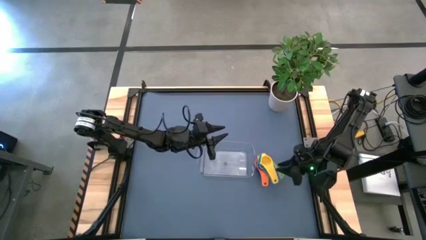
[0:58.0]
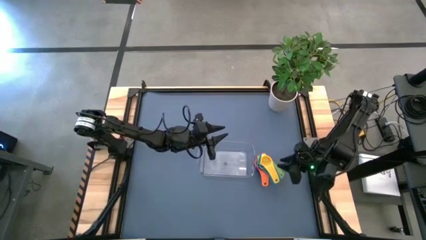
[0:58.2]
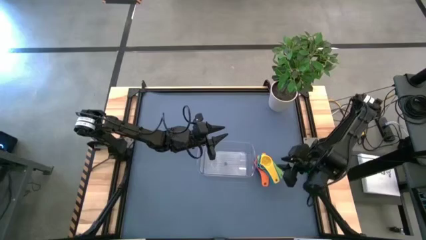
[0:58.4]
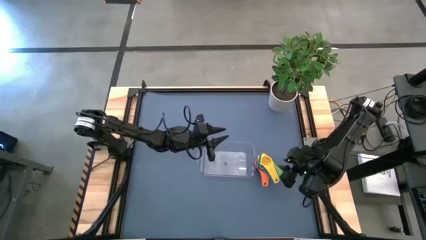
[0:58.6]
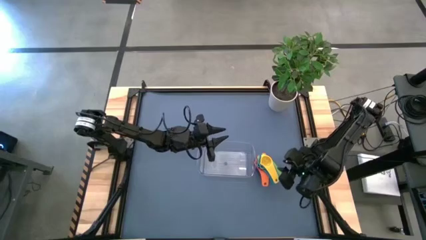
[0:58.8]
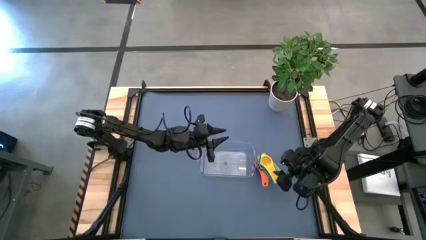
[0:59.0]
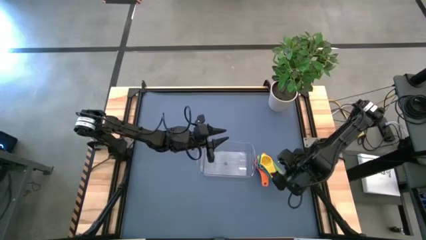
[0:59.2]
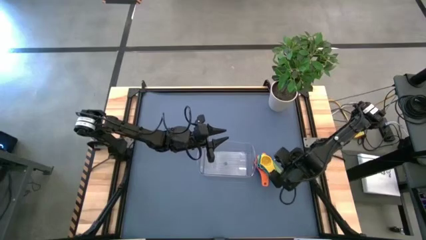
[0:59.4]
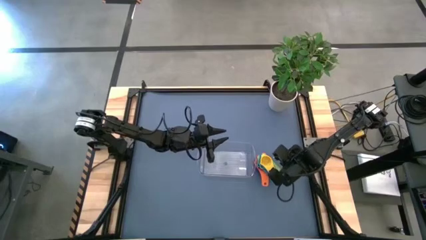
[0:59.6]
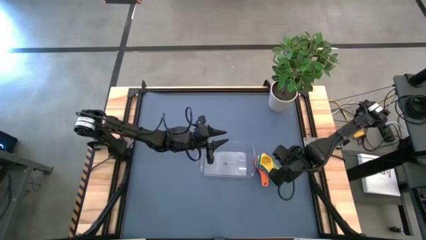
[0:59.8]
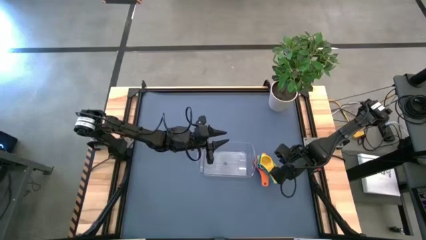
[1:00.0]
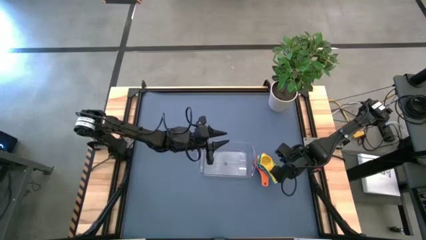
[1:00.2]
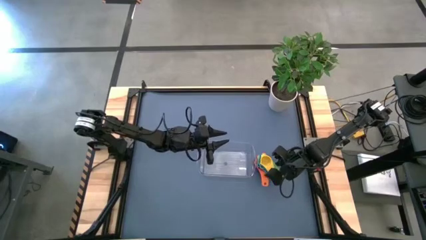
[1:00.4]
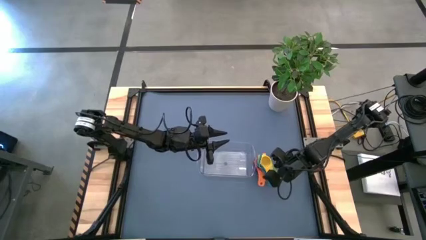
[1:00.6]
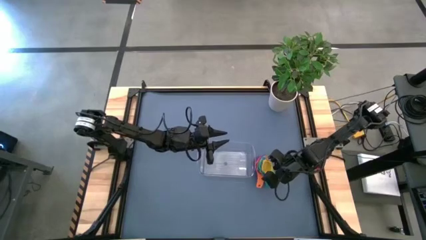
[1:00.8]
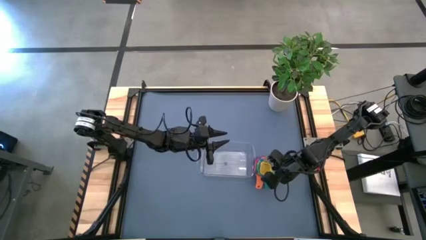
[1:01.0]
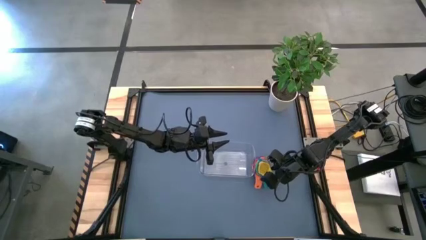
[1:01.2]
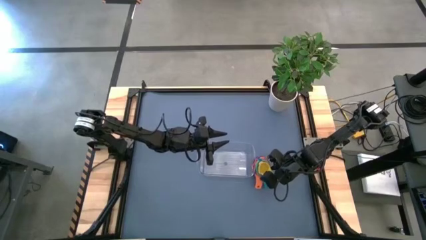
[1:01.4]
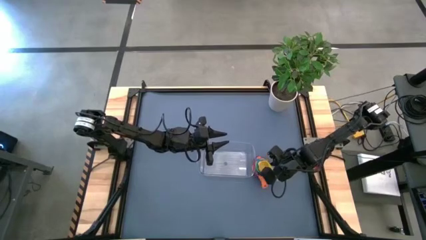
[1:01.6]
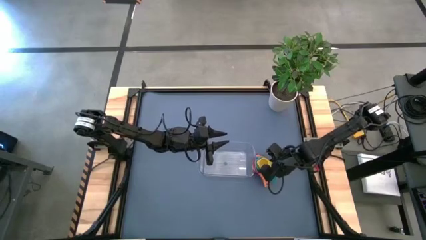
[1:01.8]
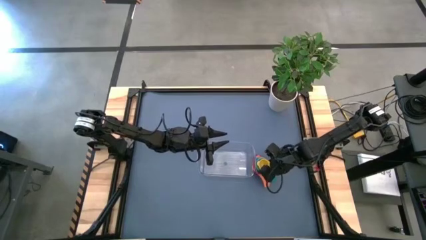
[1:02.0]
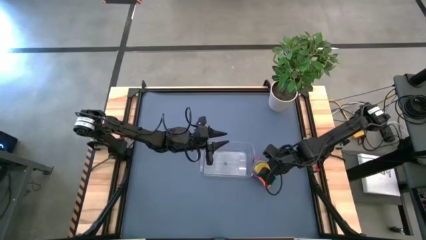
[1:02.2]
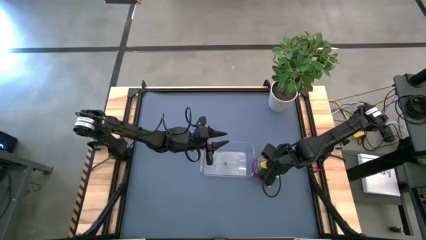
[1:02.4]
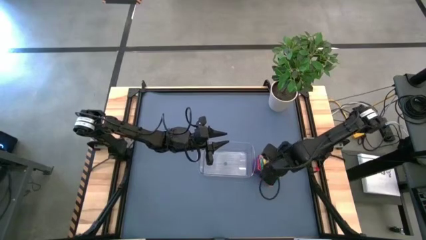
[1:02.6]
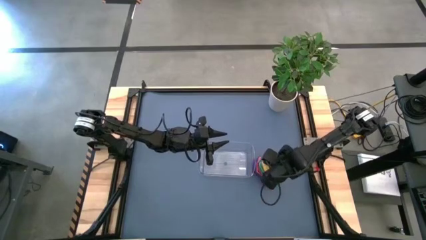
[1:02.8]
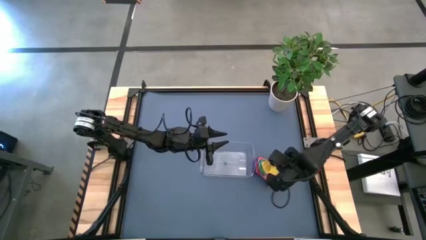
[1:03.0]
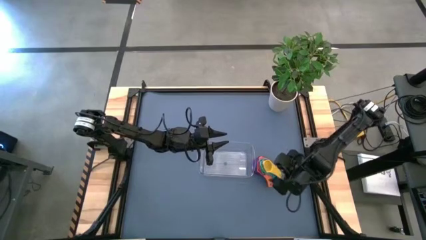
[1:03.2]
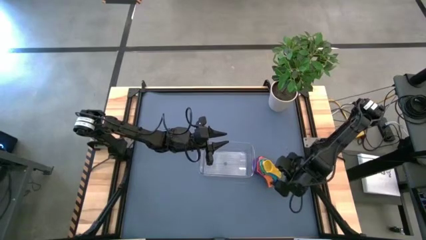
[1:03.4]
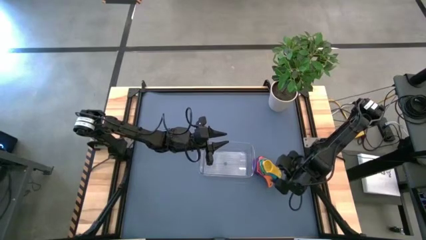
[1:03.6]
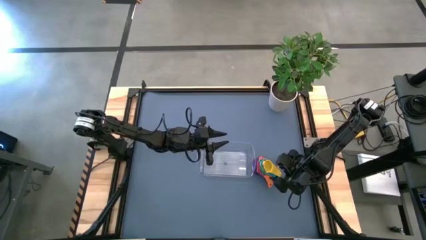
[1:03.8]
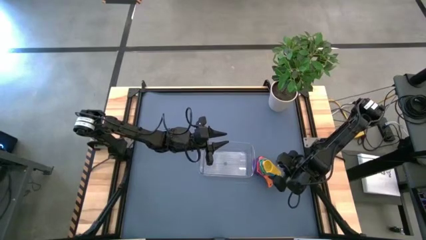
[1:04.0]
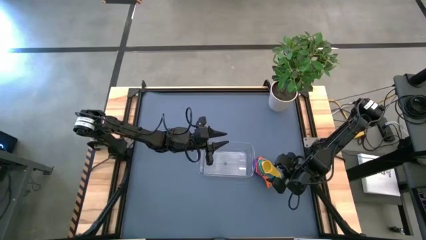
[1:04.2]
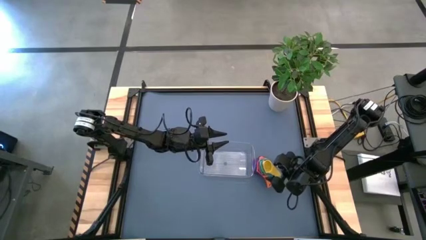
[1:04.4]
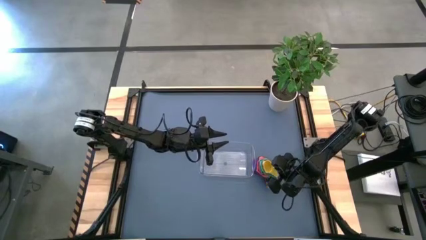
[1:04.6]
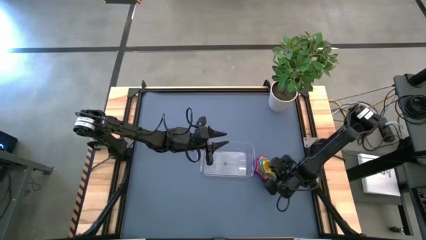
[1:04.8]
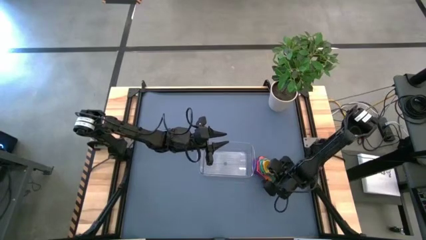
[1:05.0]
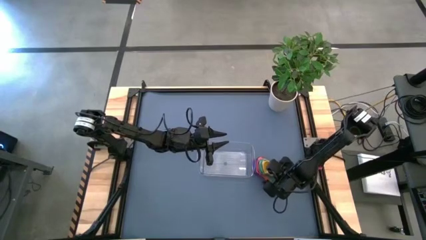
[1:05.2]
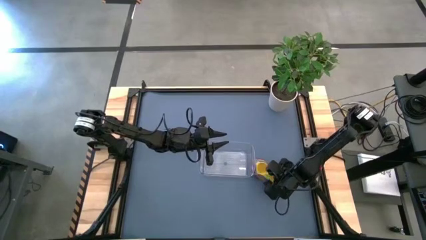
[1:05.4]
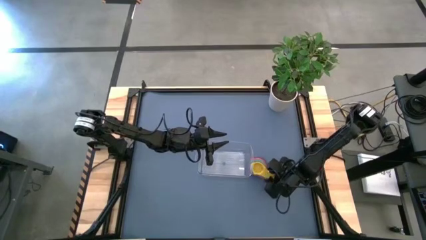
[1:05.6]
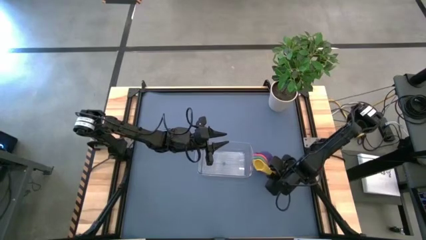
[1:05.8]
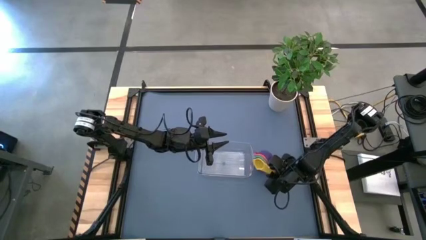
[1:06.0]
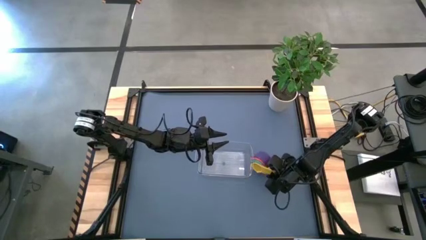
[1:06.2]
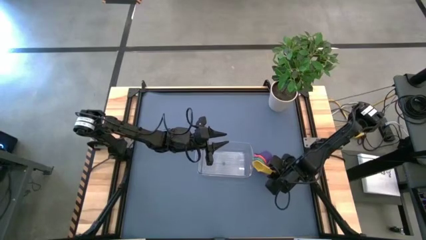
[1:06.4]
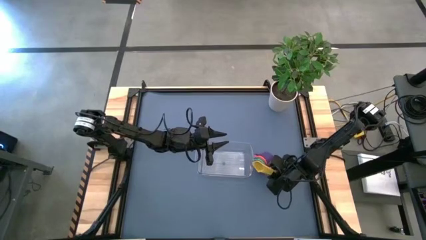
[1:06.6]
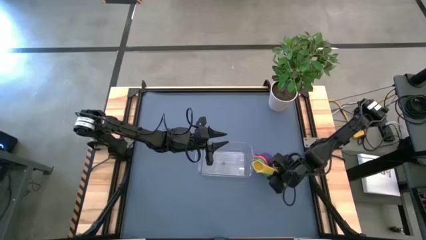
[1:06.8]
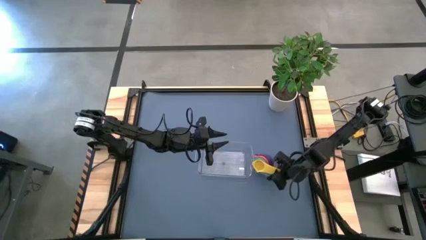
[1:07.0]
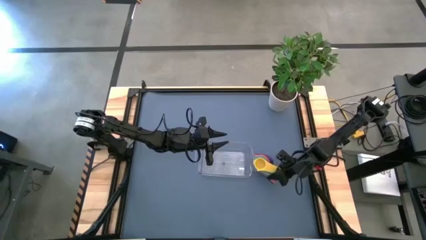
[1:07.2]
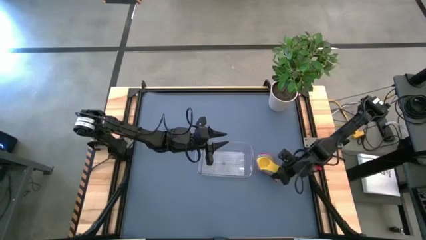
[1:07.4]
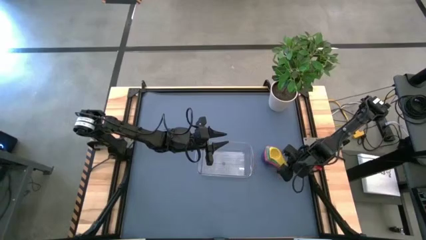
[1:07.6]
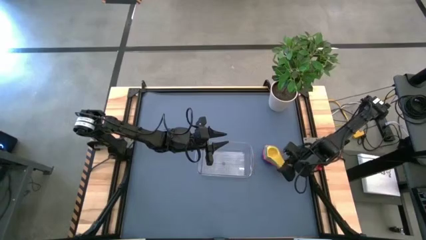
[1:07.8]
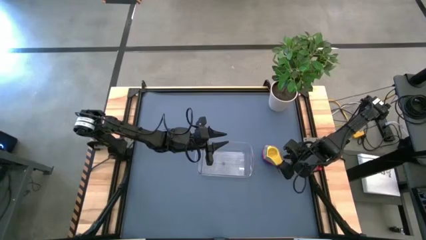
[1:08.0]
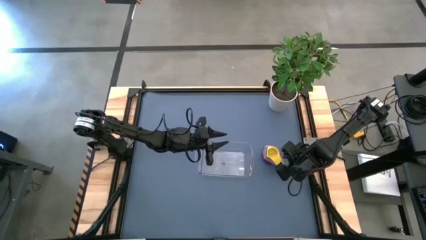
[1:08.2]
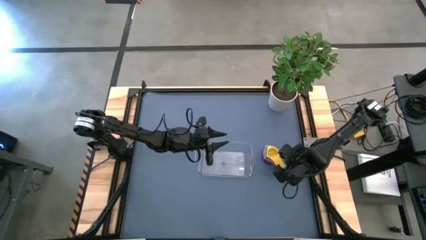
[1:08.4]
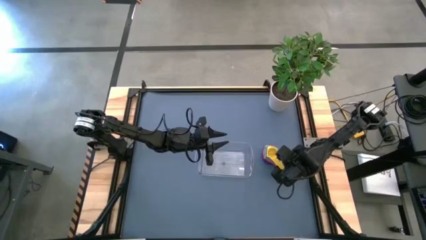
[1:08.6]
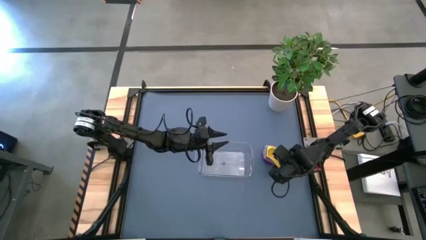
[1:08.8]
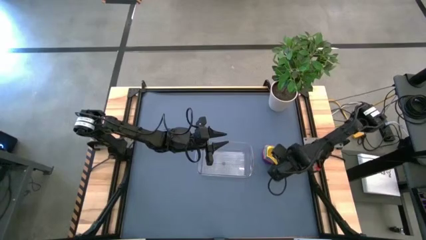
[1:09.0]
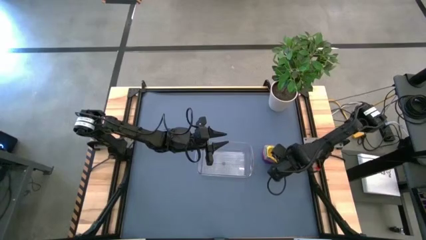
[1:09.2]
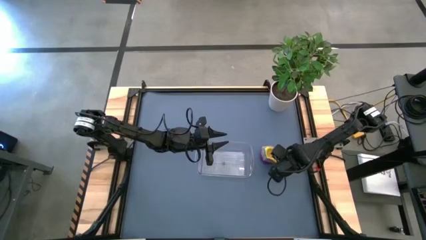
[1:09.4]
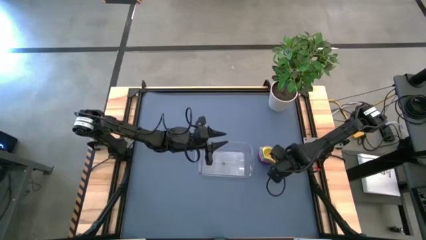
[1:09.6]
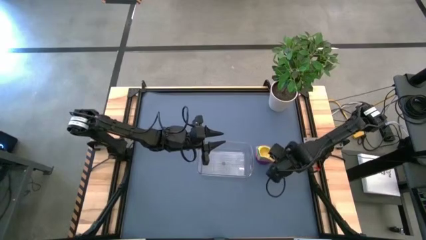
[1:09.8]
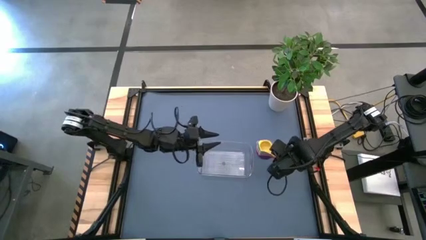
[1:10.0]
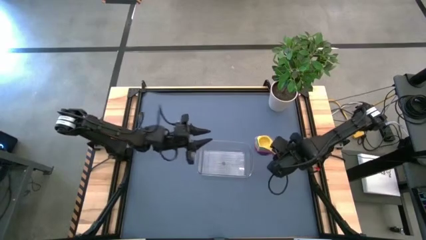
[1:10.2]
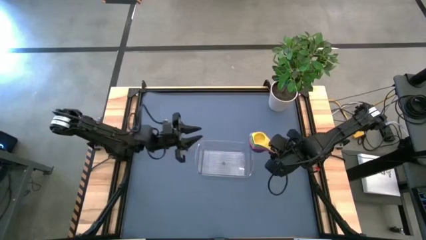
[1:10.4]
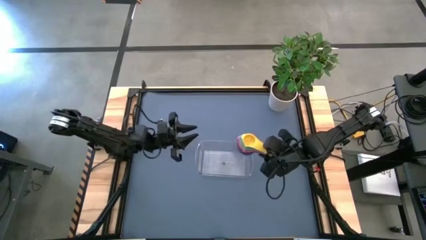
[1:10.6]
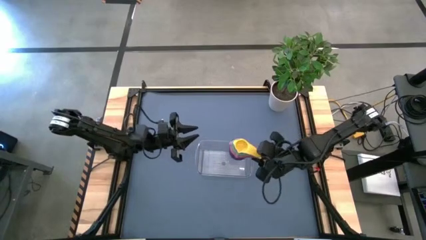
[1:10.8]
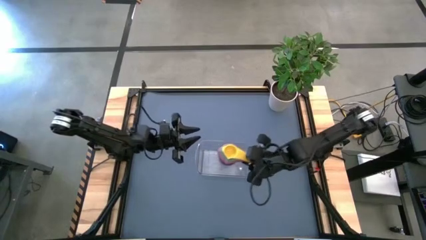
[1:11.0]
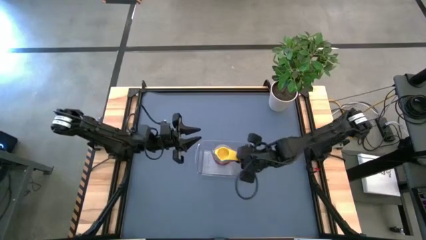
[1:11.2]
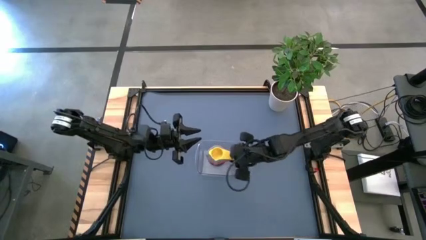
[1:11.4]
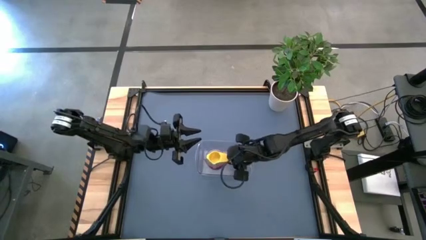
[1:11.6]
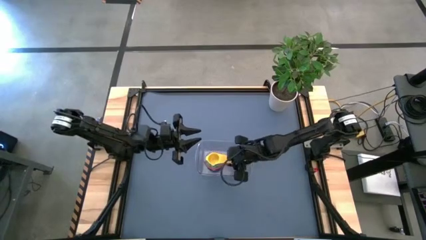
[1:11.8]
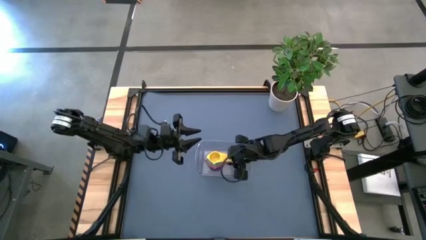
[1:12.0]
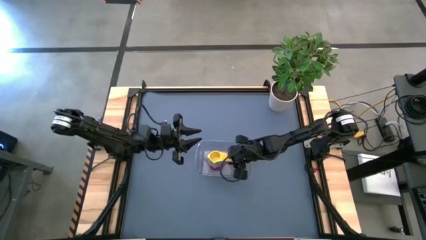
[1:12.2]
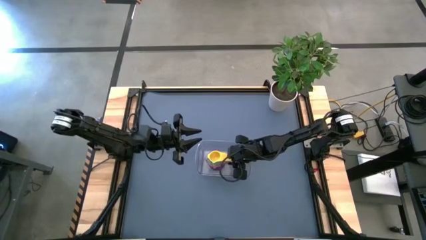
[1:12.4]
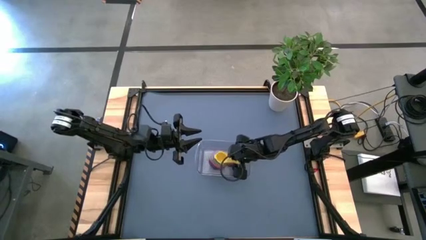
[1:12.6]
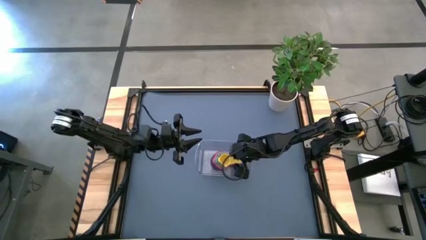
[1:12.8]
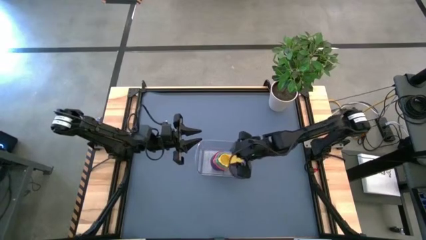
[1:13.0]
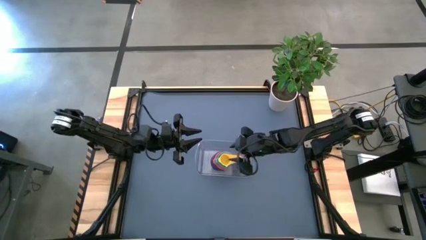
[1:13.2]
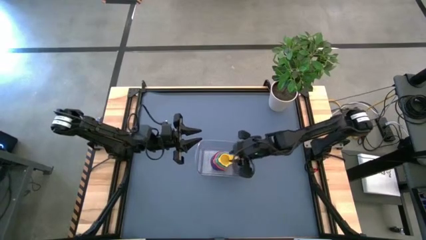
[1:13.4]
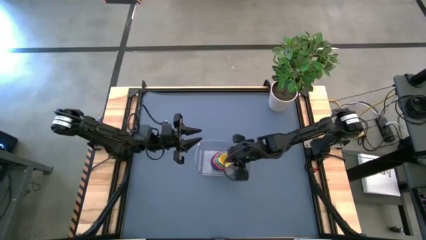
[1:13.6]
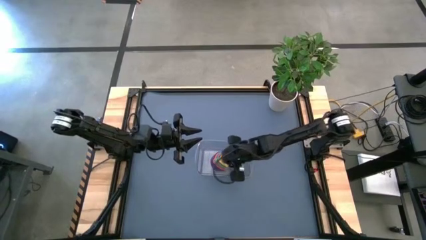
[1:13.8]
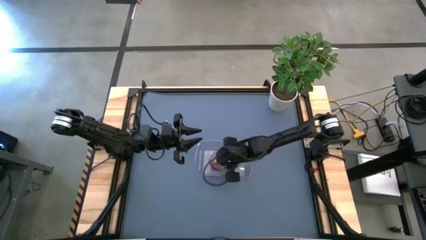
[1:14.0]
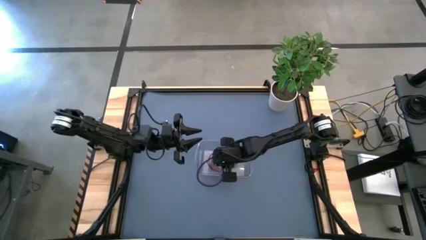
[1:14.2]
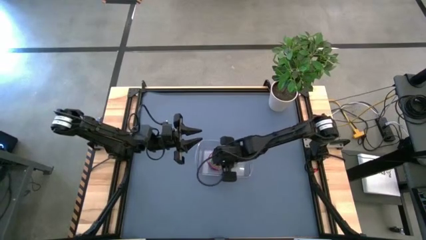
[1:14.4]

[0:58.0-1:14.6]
Task: Nest measuring cups in basket
Put the nested measuring cups into the transparent bin
